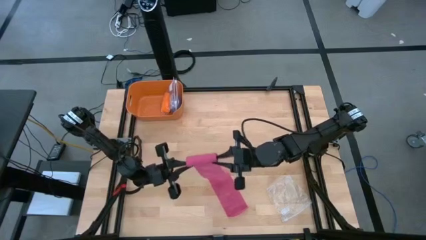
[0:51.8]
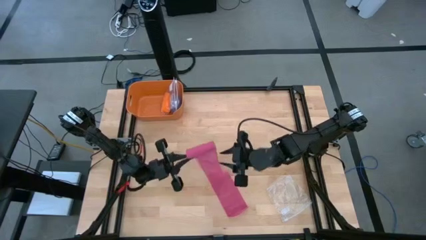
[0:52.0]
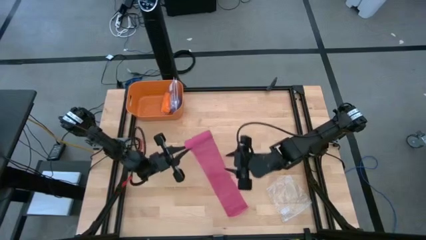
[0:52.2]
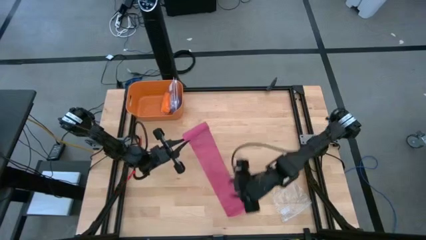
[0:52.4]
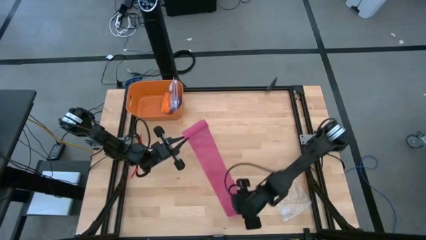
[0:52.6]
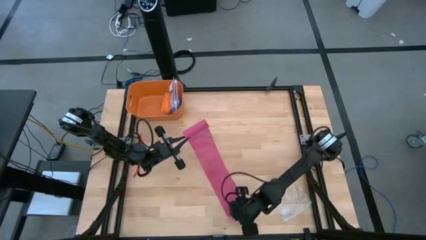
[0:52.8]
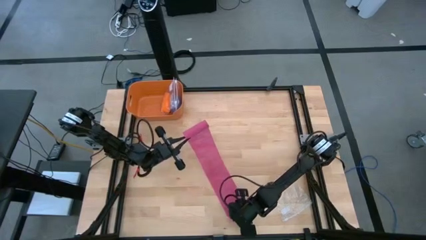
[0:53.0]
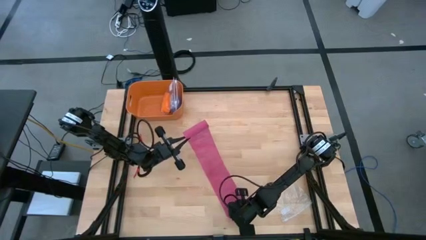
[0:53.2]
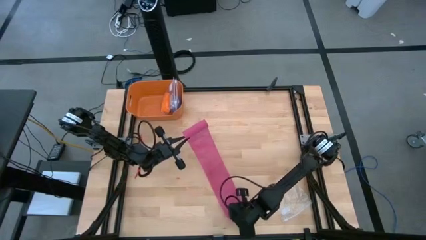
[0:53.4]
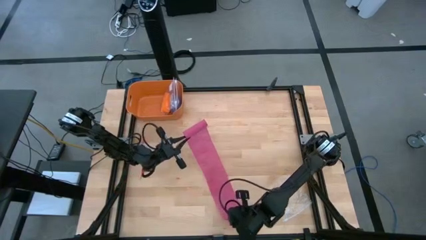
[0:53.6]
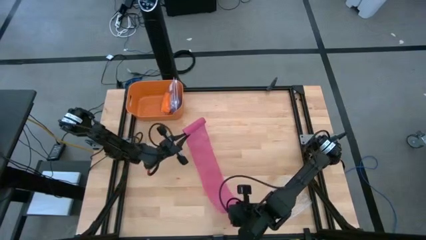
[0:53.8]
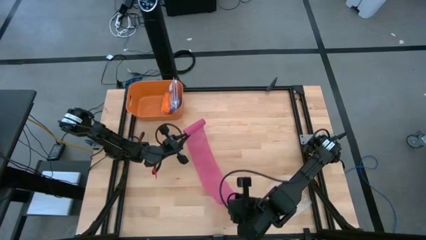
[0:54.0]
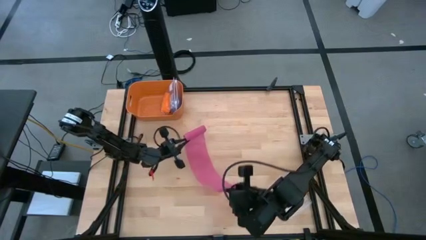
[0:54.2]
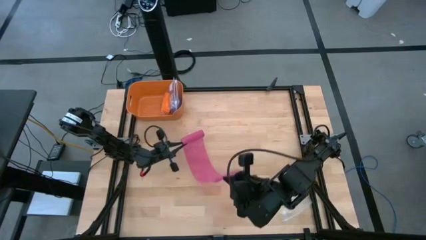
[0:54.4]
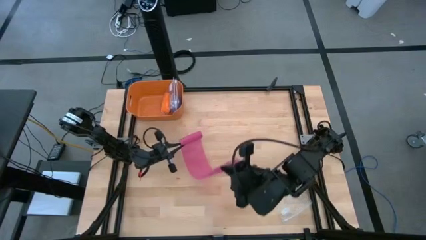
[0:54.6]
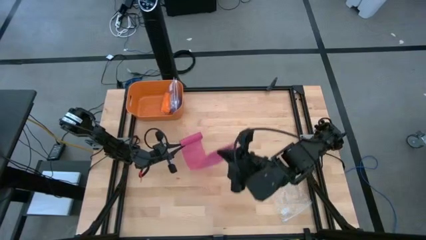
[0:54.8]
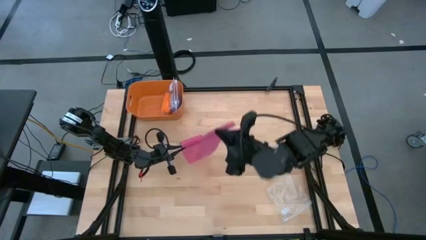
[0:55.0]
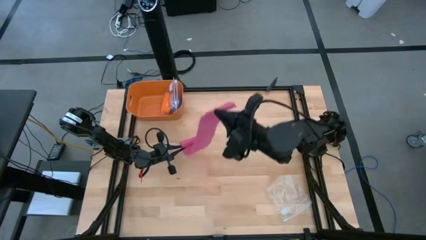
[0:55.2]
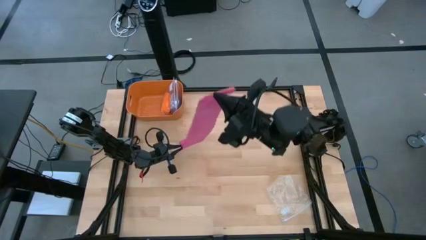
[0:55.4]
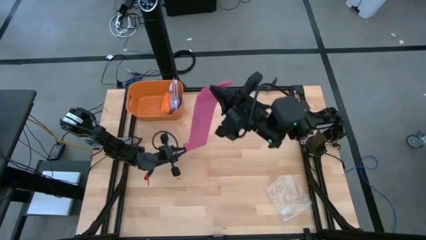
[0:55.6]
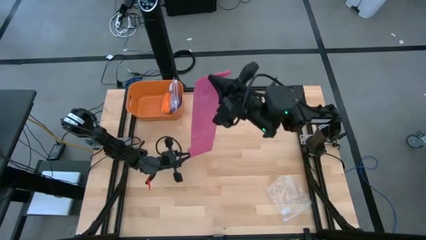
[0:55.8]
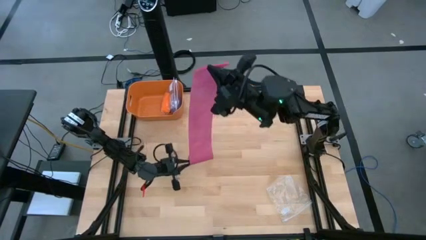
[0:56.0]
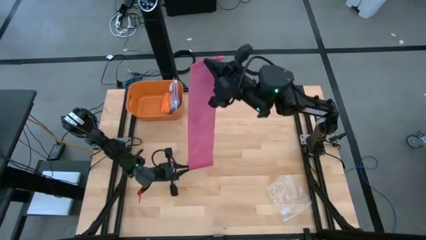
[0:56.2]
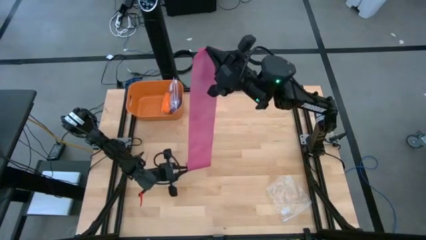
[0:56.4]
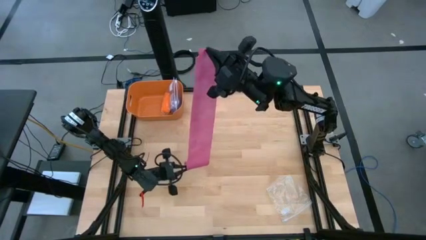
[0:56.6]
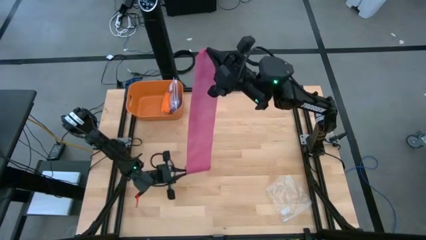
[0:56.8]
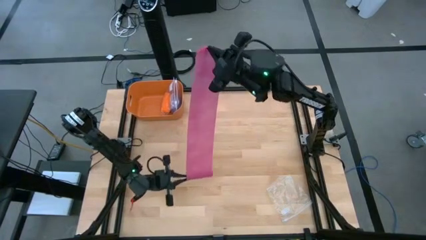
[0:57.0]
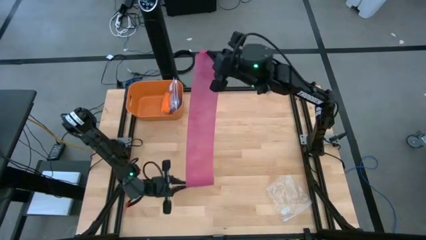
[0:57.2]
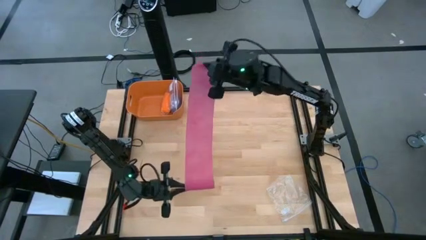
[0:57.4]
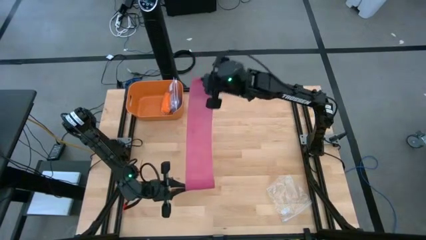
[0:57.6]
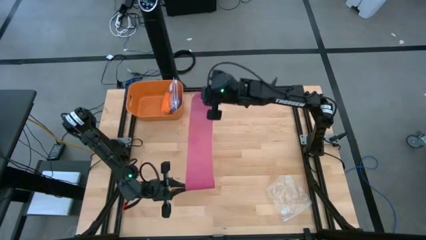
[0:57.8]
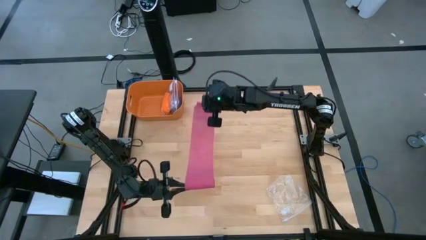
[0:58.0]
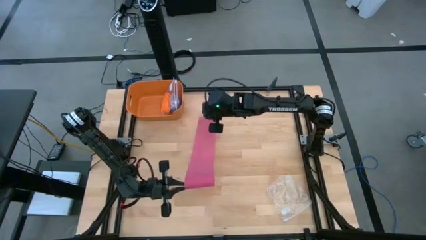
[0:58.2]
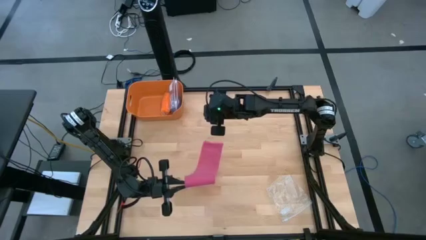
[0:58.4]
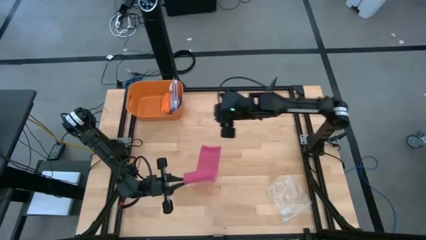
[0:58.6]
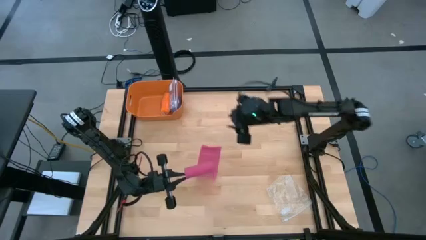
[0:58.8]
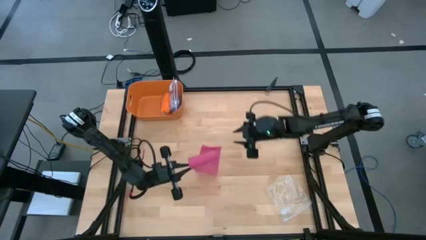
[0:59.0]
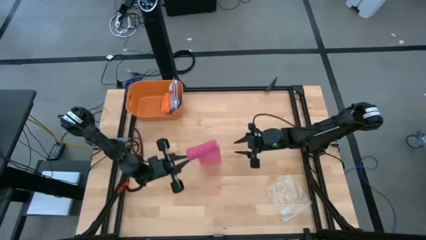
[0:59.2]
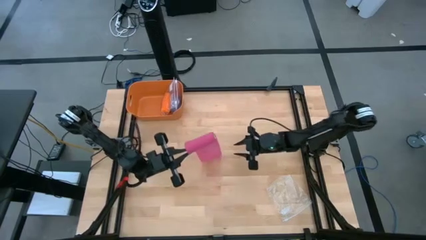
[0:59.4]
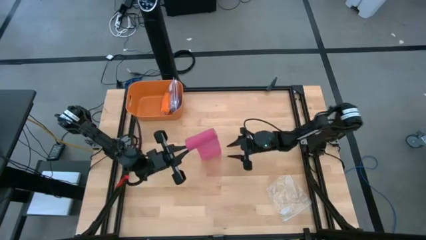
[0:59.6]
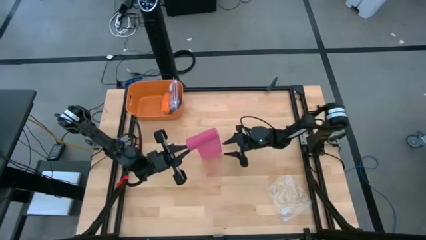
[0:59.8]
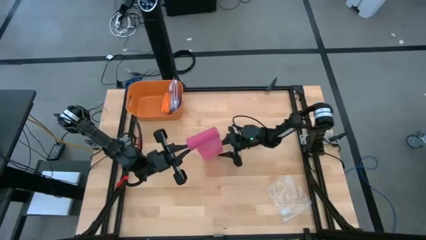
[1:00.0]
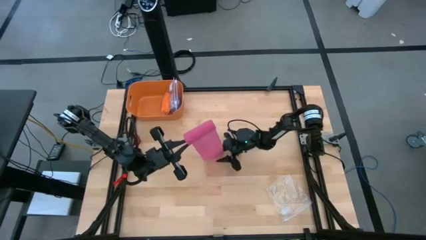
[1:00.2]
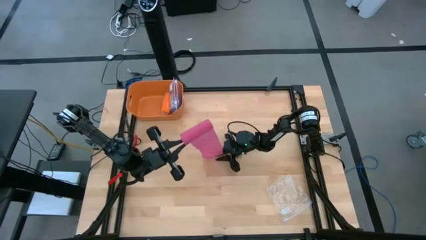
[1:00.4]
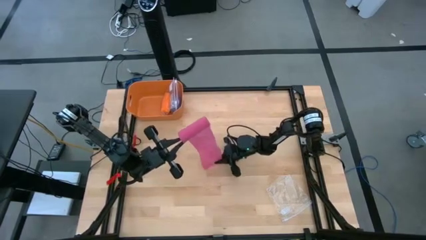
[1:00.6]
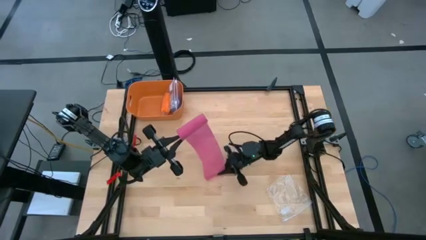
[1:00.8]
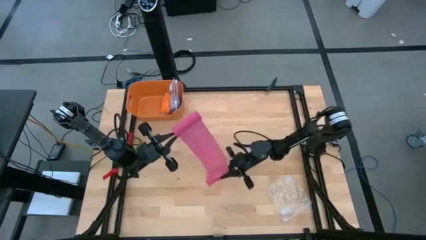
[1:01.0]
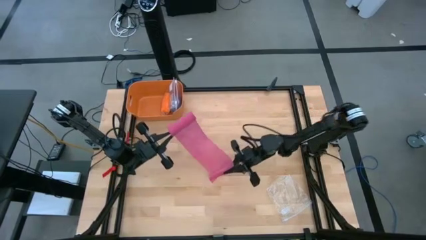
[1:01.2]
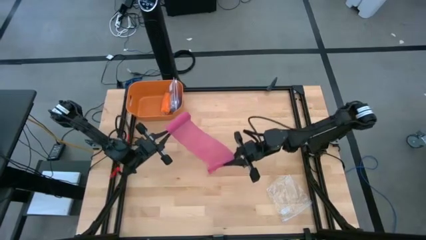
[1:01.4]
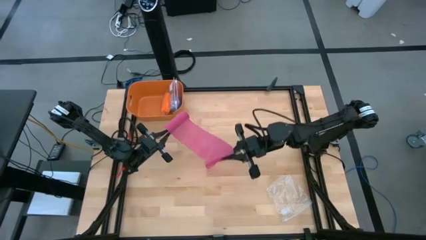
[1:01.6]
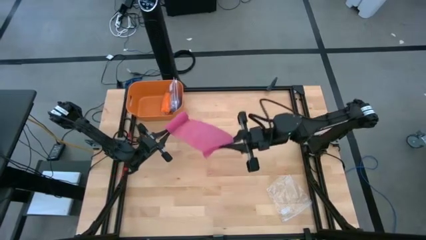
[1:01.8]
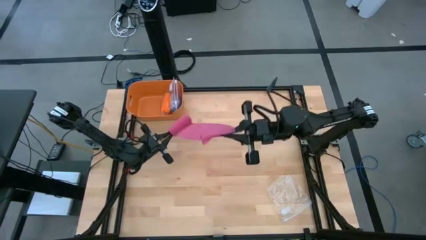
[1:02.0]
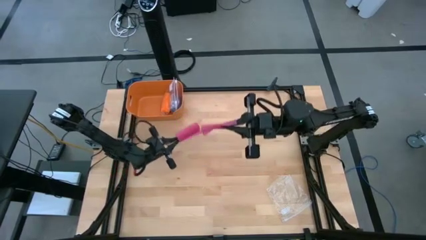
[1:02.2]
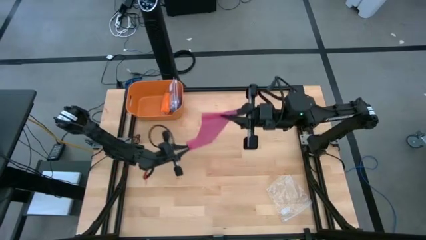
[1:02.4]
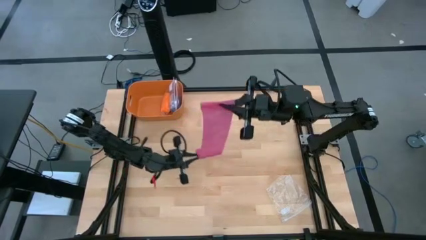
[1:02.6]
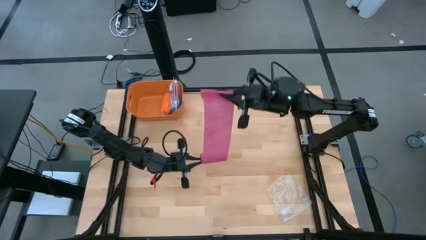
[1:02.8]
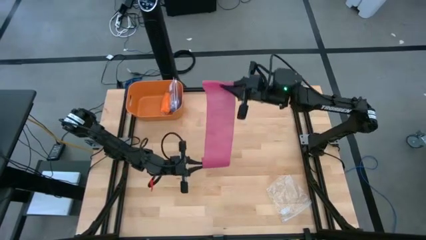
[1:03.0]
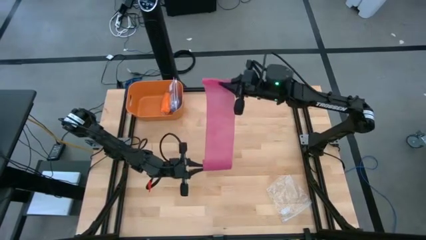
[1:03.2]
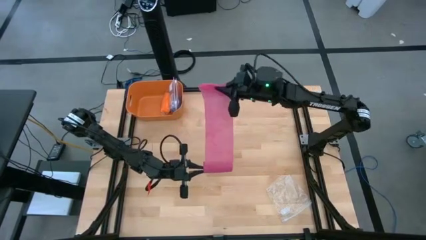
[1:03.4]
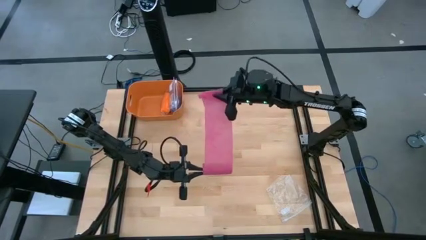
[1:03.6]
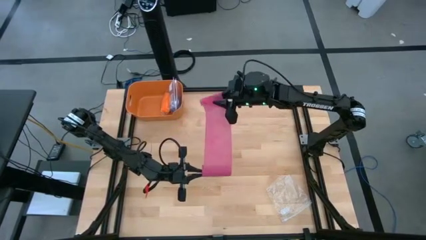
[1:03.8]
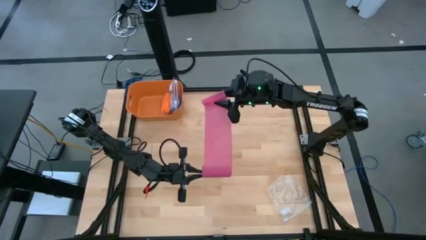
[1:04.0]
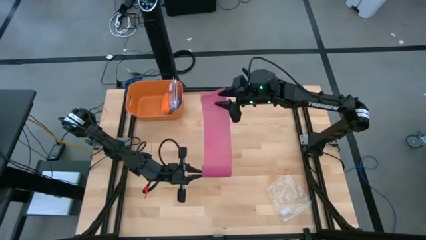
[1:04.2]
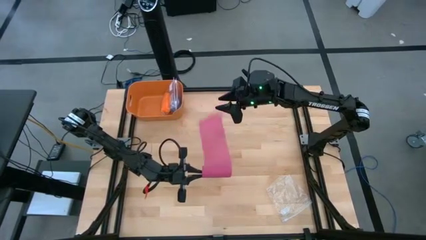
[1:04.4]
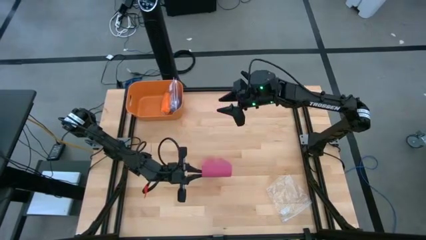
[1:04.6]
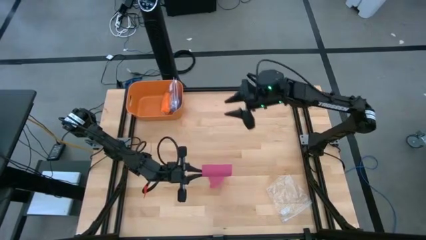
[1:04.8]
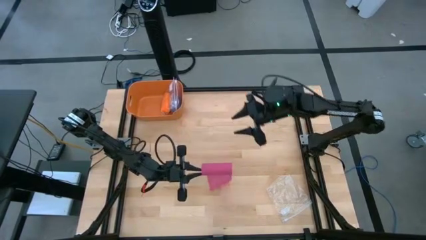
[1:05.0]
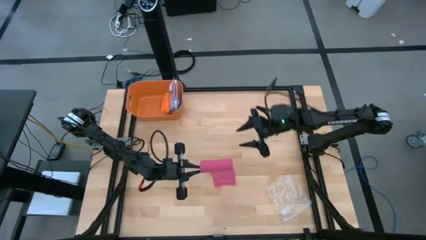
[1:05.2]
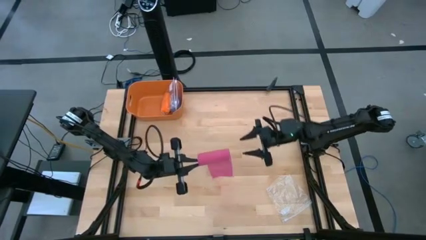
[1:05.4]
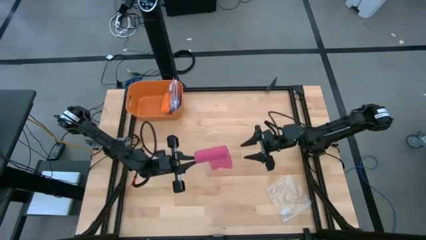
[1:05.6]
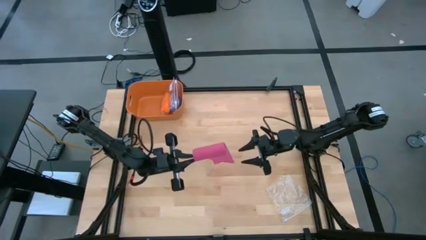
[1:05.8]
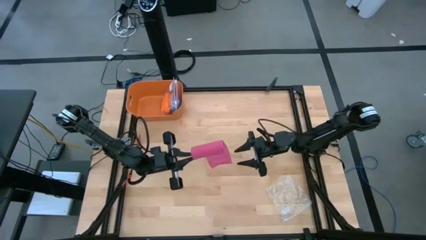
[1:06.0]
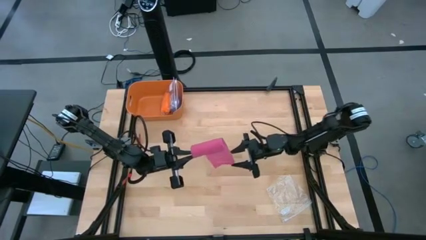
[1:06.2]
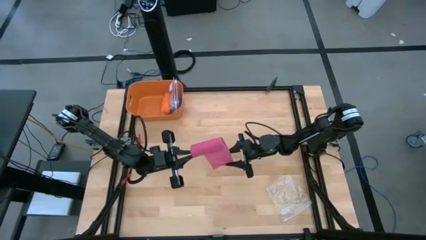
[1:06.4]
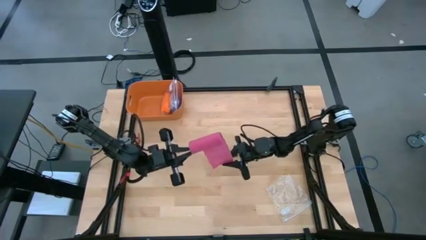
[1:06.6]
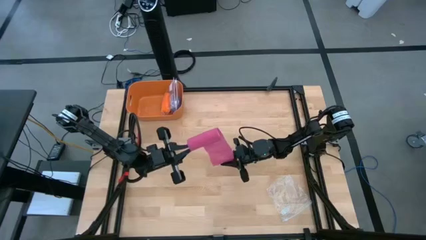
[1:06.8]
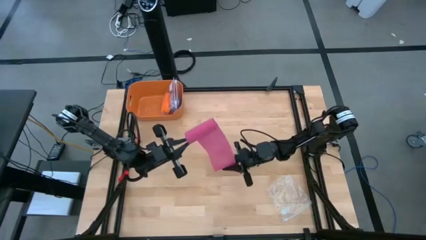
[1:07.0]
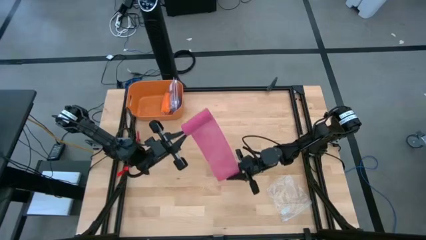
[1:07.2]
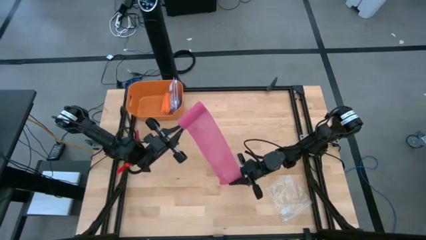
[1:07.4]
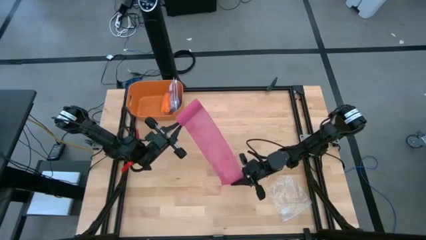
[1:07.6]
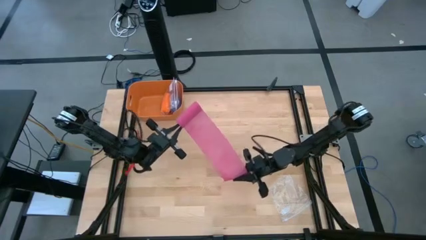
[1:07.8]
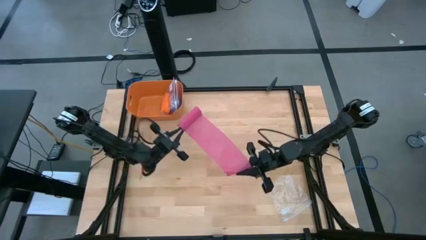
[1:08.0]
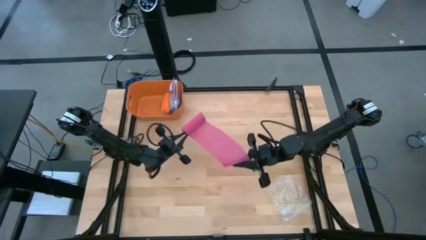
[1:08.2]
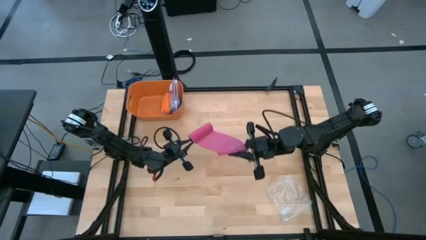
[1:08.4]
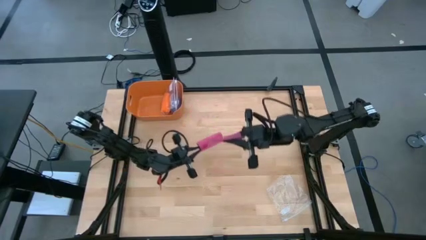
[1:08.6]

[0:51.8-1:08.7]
Task: Roll bandage
Roll the pink bandage
